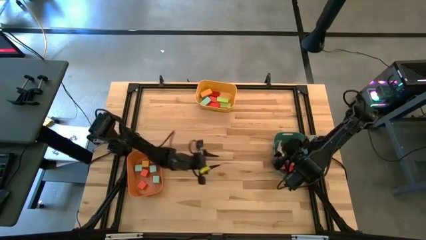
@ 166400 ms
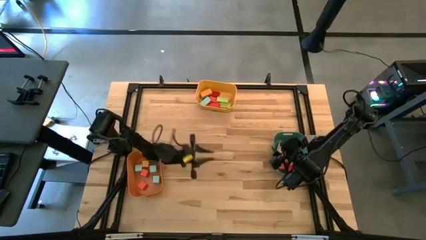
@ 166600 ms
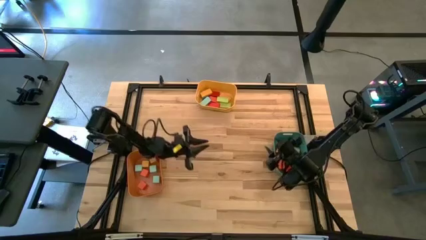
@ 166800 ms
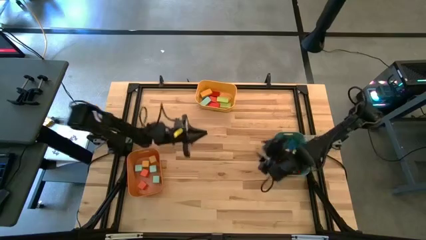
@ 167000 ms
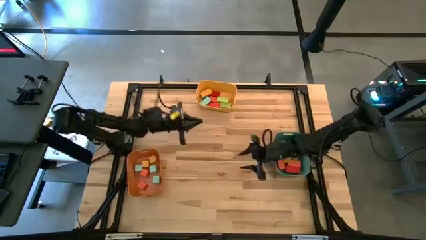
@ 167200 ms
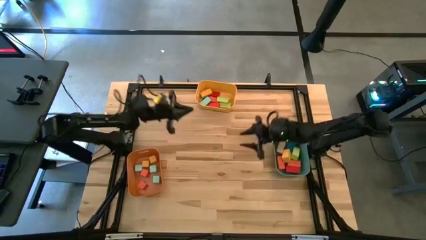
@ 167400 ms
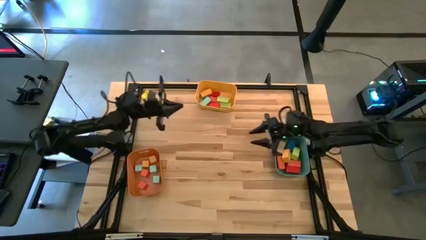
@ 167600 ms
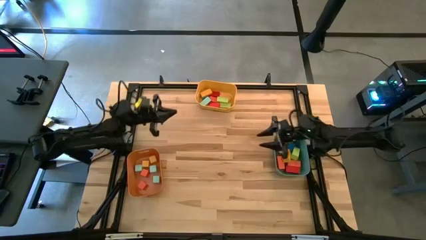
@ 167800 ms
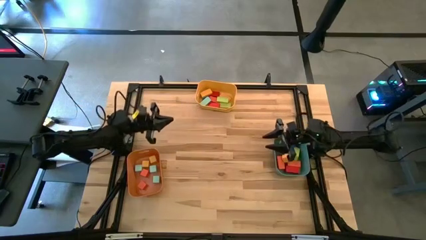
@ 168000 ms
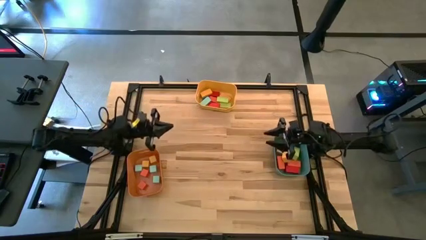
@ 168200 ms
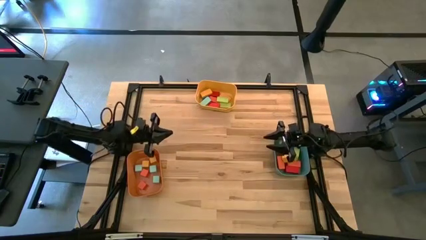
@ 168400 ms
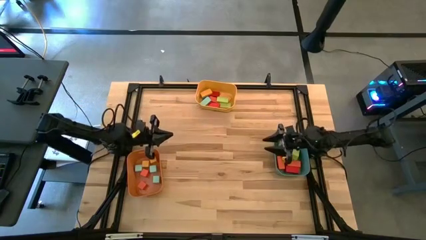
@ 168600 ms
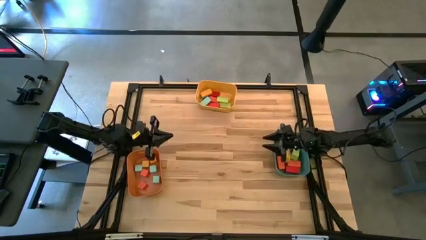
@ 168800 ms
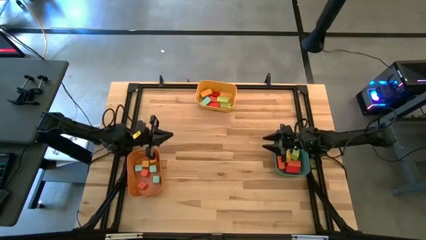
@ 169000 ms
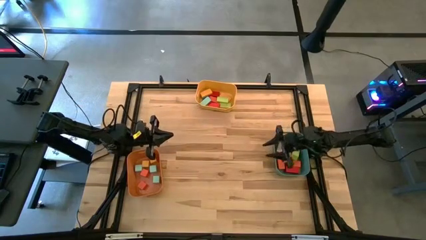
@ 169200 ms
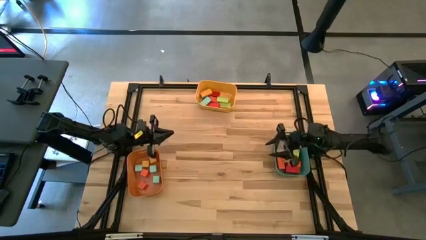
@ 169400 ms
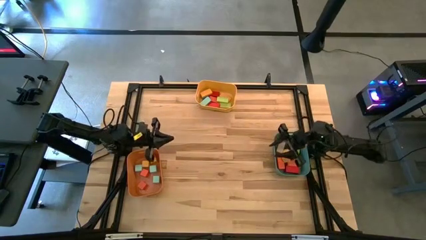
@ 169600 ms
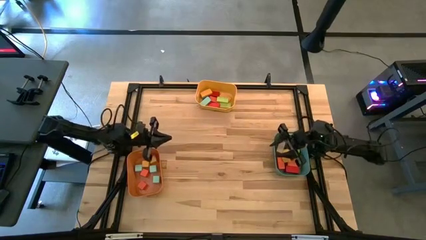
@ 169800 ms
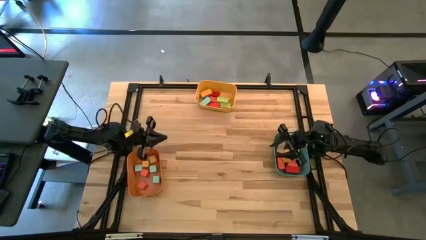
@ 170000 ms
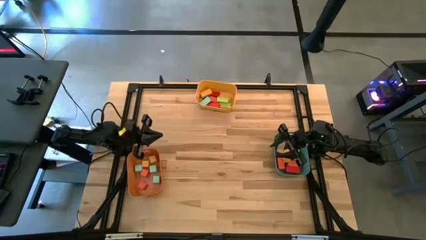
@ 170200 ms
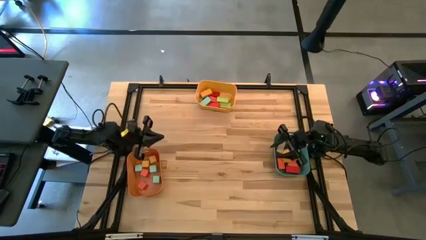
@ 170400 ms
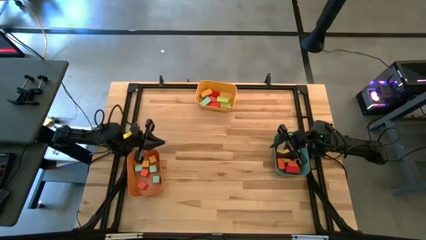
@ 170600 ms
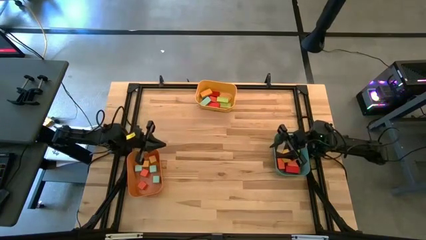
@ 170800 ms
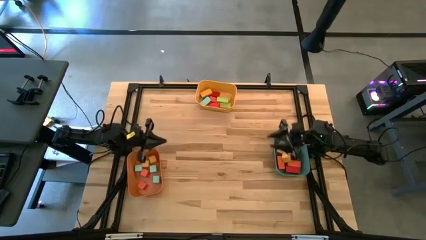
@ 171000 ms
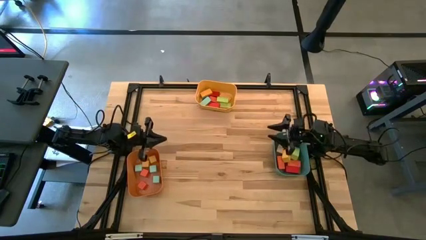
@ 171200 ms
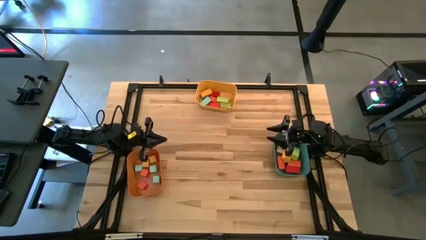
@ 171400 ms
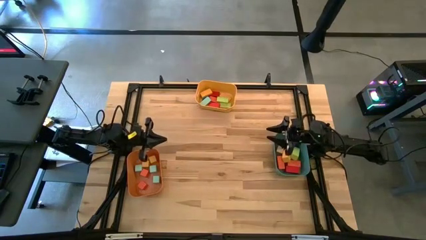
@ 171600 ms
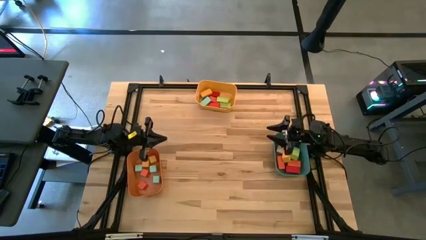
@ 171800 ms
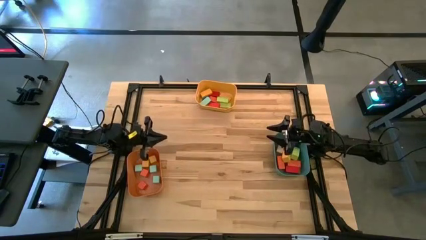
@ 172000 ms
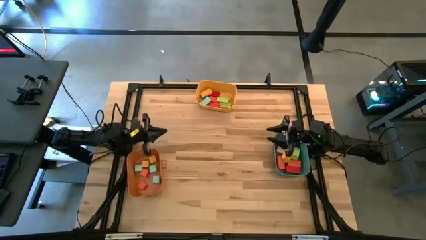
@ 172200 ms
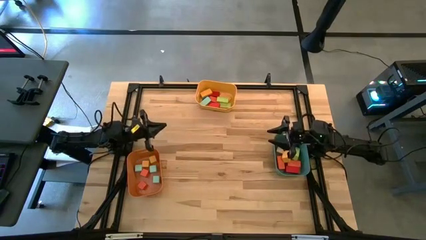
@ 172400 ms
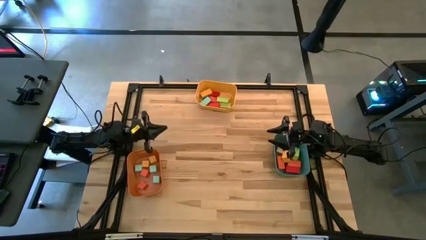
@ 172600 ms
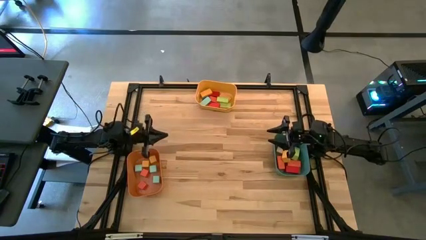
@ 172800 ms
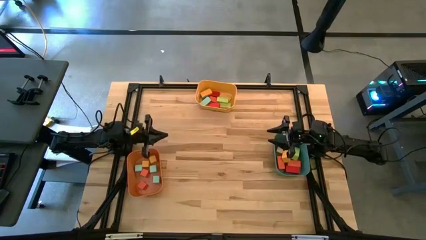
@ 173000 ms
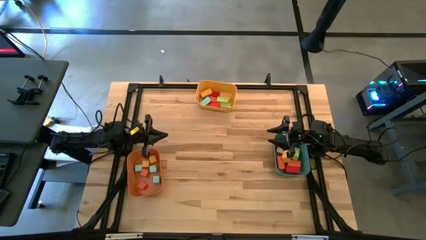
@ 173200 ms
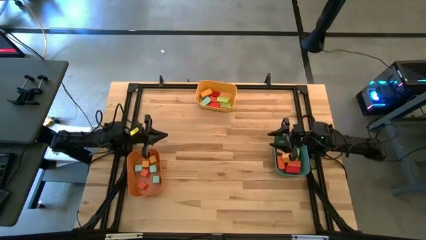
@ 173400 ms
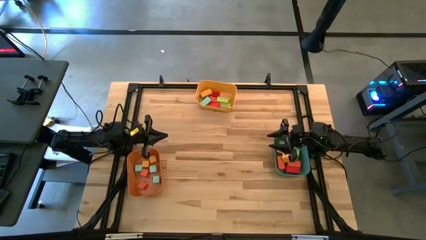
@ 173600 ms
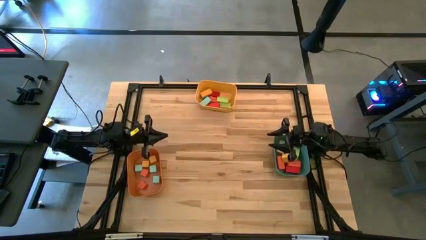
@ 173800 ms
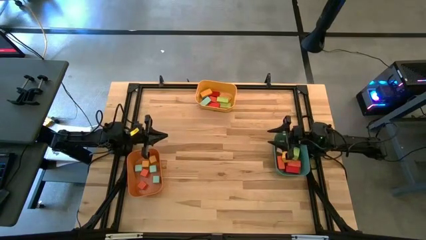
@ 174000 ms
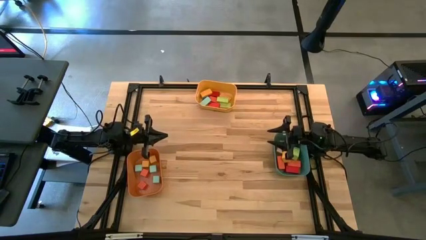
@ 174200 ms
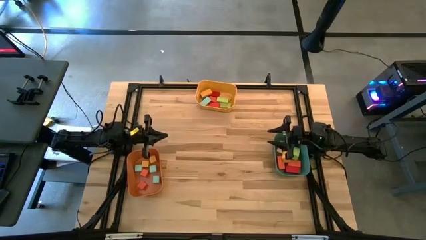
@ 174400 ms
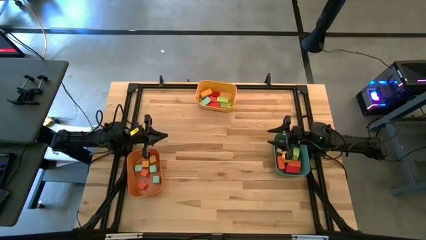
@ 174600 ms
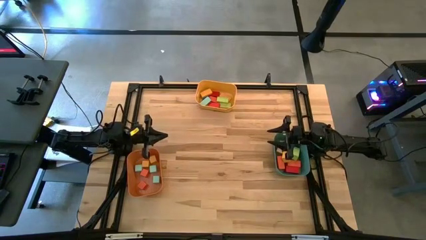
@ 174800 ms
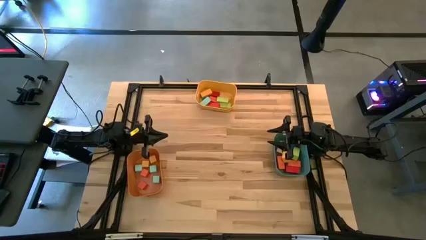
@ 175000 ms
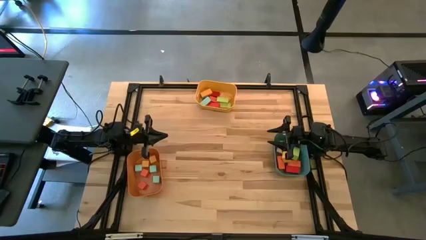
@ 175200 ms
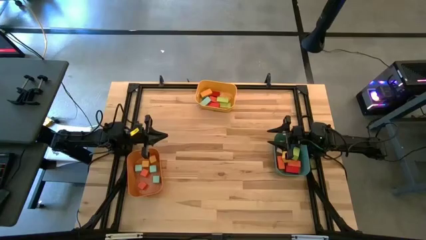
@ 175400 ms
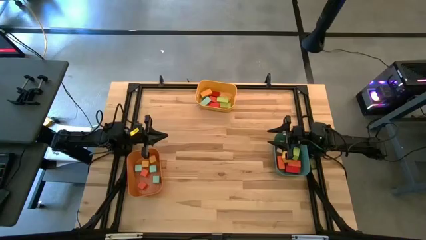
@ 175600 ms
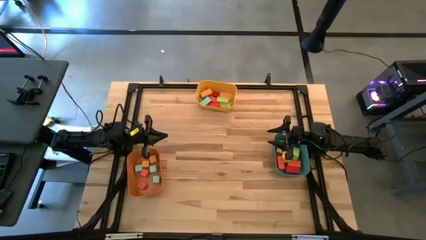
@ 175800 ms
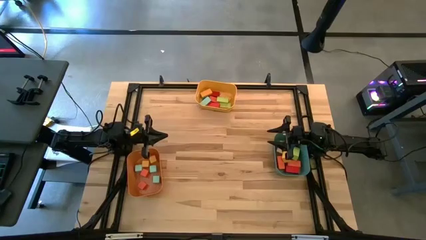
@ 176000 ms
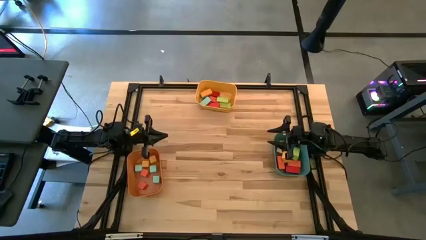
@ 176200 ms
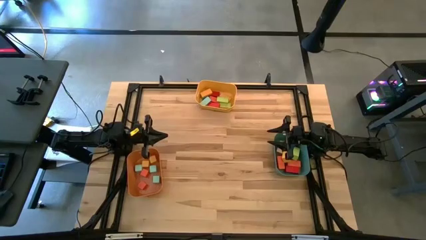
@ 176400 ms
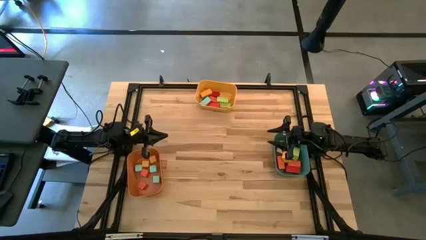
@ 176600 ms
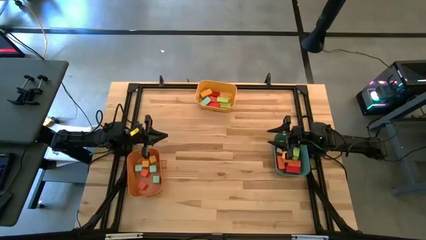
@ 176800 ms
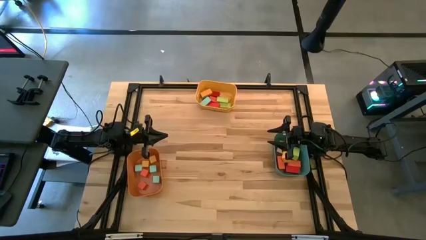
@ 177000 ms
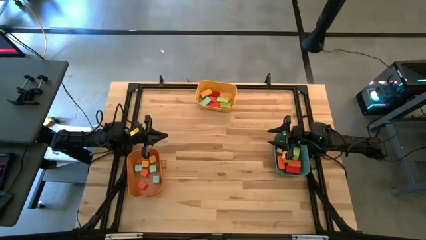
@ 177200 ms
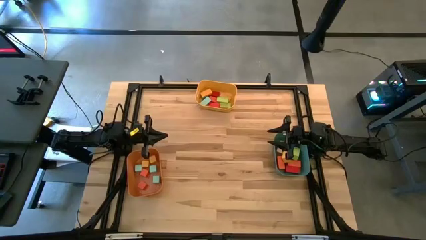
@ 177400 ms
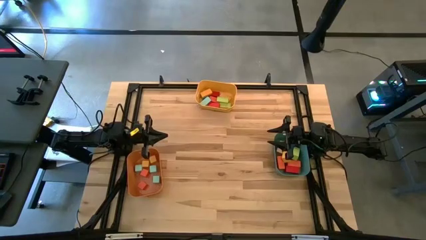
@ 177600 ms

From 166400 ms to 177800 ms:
Task: Sort blocks by size
Return to Home Position

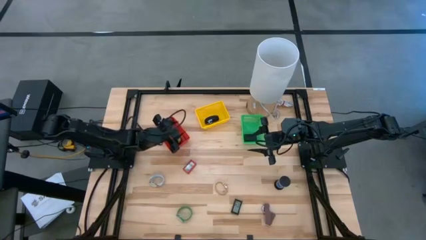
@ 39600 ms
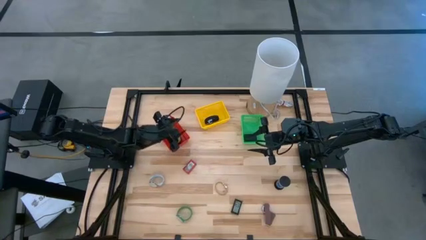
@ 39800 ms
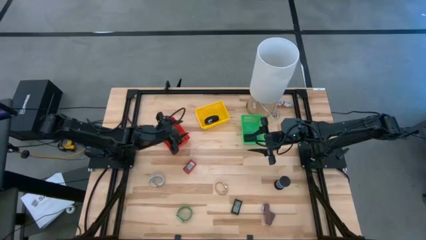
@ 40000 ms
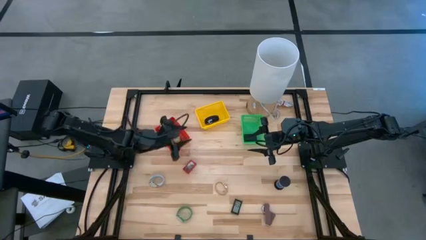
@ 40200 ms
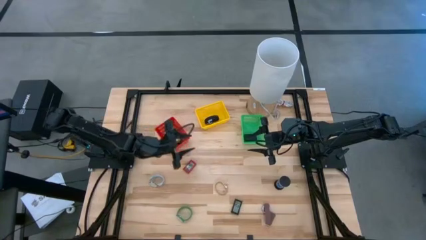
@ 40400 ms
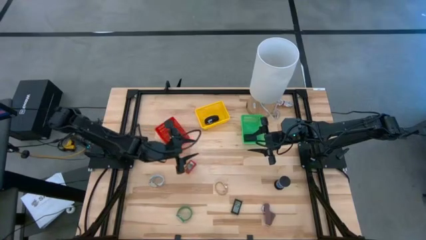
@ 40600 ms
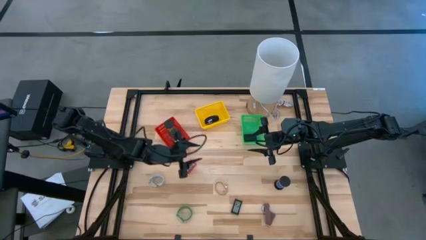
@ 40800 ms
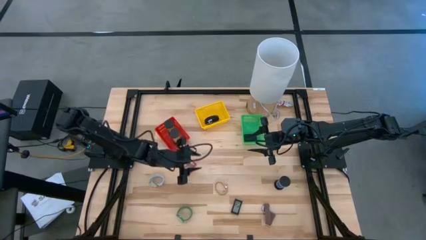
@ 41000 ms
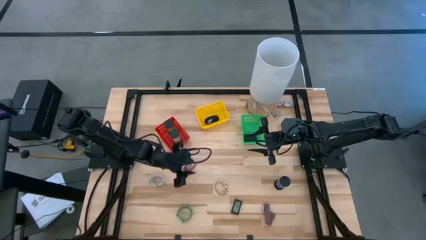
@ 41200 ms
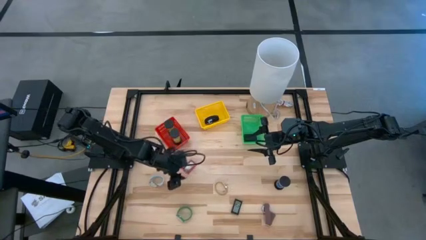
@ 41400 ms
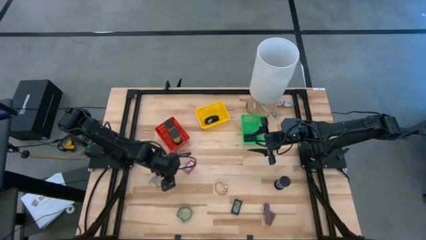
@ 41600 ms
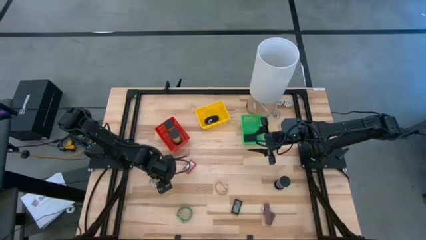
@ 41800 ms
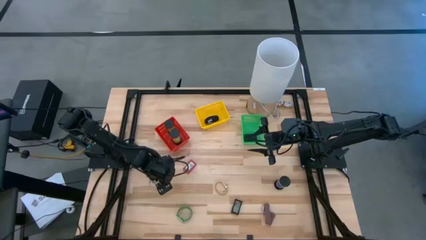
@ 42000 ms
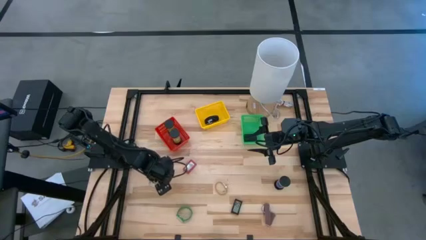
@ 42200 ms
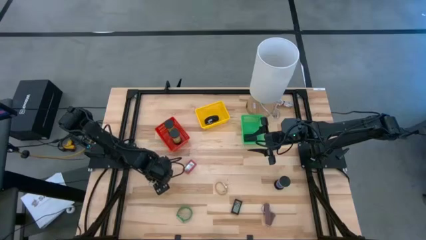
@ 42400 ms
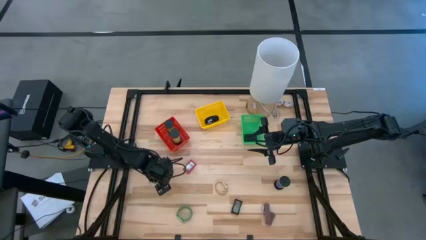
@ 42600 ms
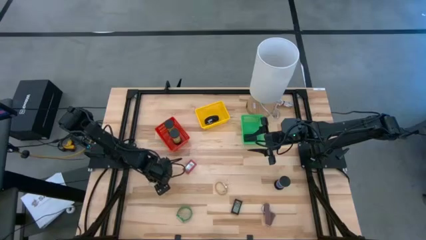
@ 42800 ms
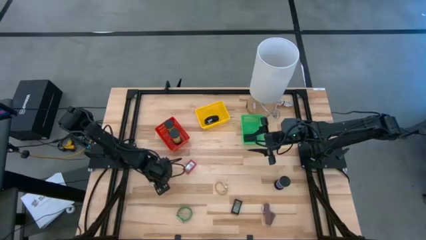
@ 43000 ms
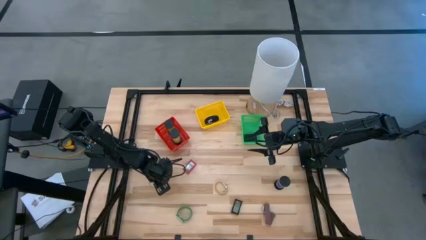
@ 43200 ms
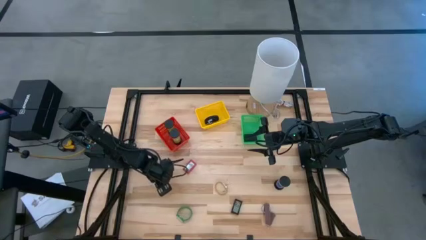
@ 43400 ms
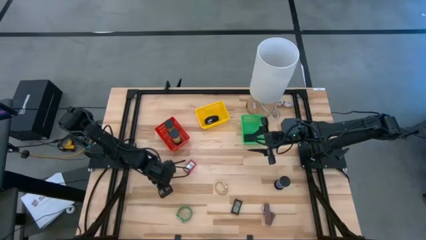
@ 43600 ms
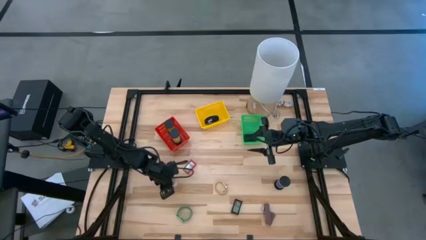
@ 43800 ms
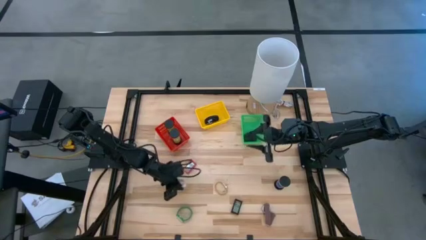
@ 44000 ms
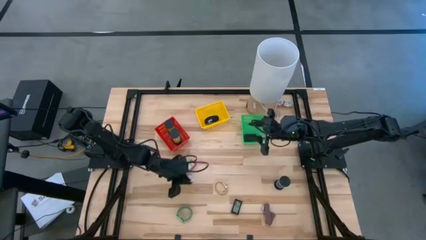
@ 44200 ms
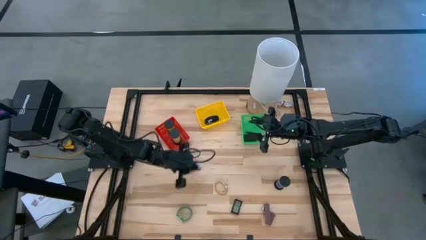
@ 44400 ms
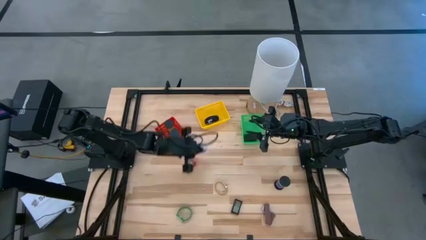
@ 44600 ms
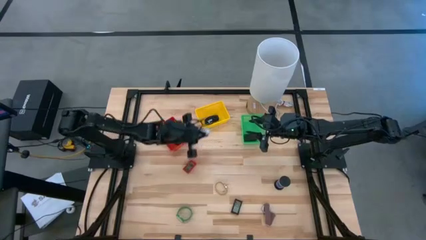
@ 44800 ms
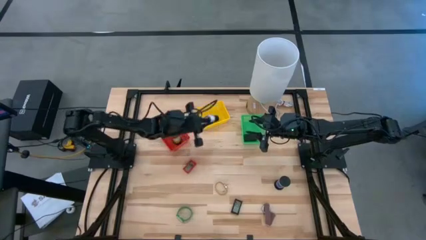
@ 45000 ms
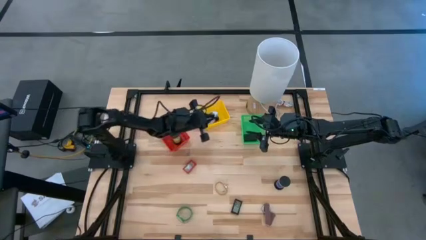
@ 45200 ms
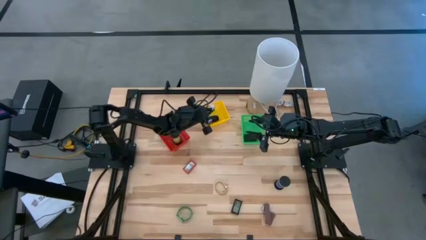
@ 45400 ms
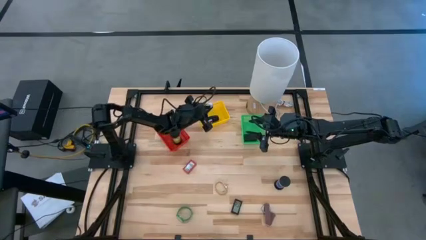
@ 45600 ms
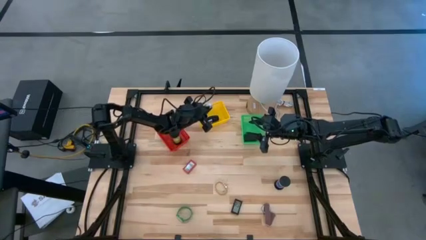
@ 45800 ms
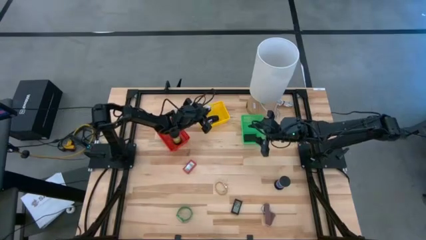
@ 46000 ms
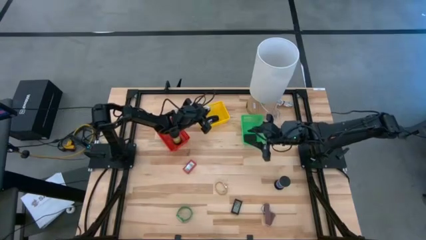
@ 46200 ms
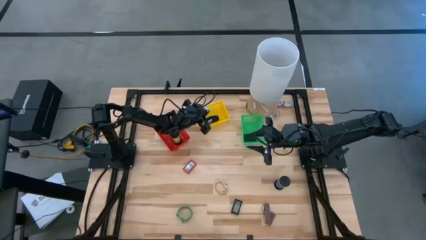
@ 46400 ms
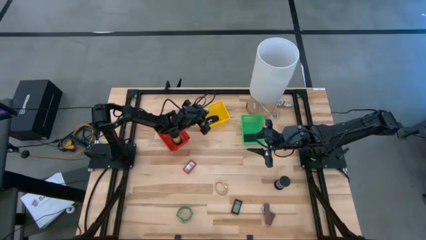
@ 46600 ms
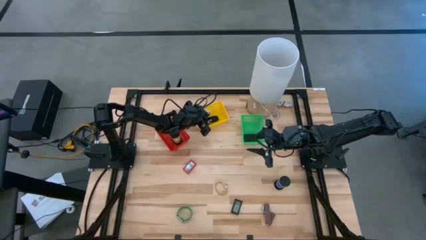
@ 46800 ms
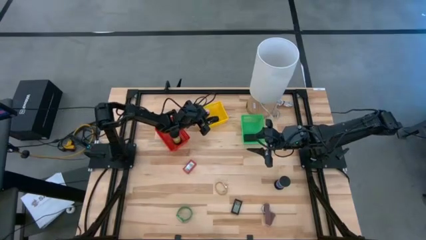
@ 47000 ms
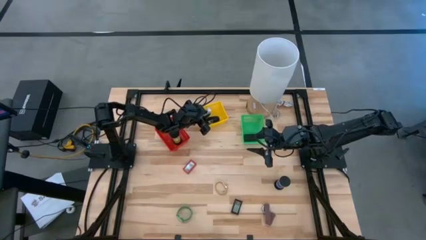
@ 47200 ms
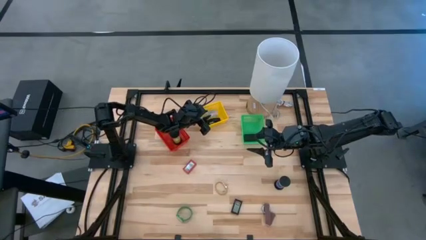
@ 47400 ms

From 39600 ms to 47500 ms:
Task: Pick & Place Office items
Put the pale blue watch into the yellow basket
